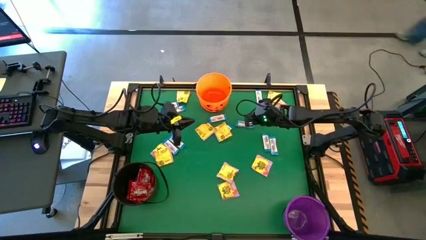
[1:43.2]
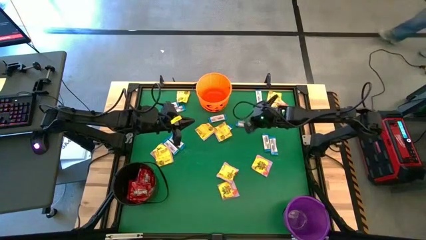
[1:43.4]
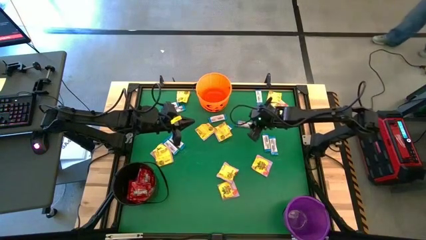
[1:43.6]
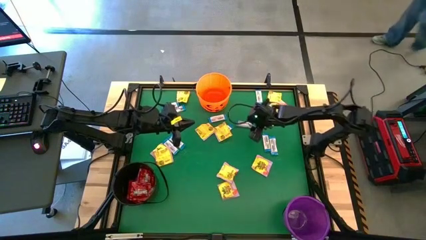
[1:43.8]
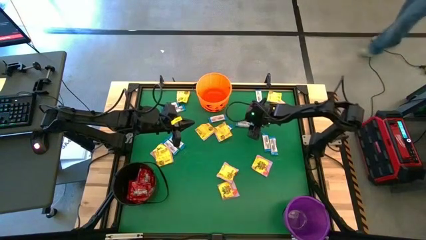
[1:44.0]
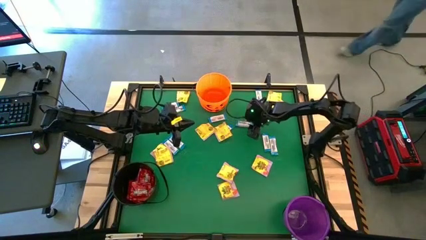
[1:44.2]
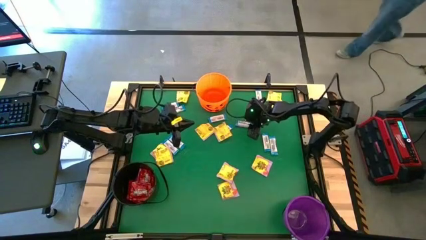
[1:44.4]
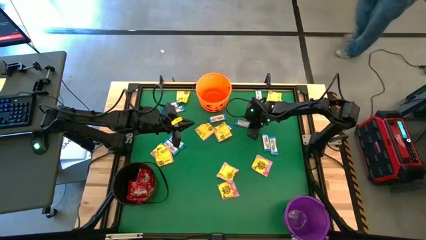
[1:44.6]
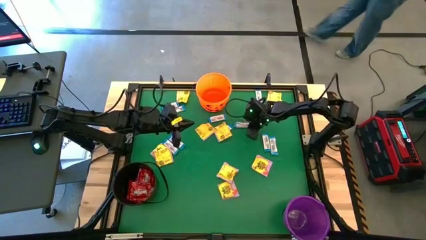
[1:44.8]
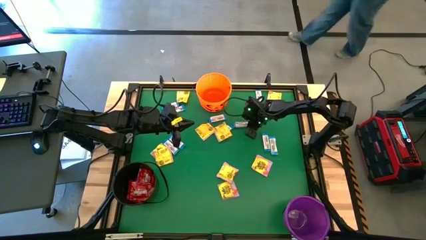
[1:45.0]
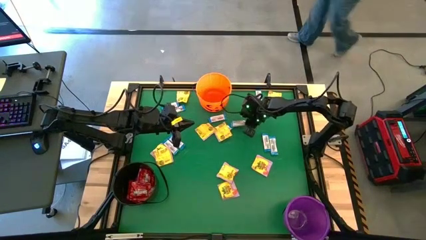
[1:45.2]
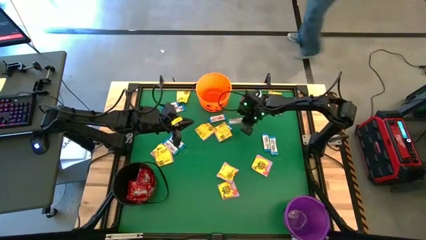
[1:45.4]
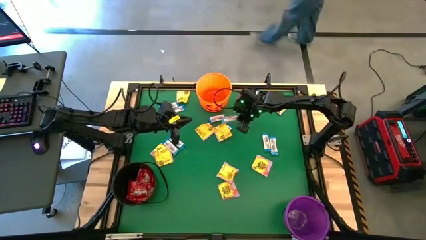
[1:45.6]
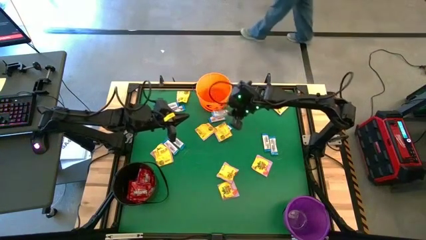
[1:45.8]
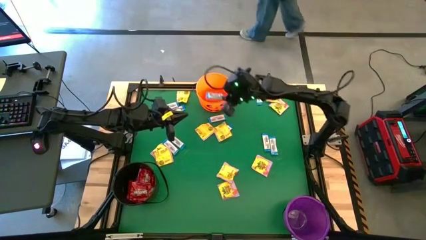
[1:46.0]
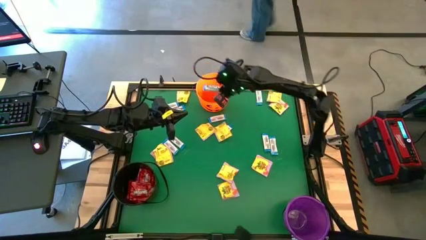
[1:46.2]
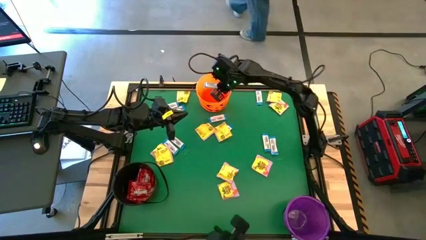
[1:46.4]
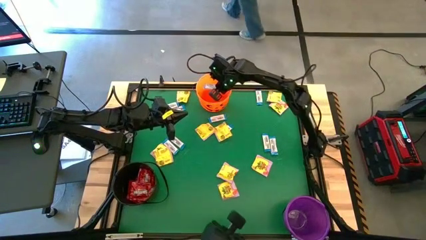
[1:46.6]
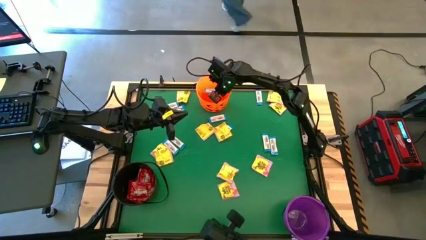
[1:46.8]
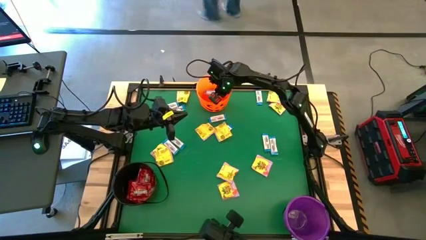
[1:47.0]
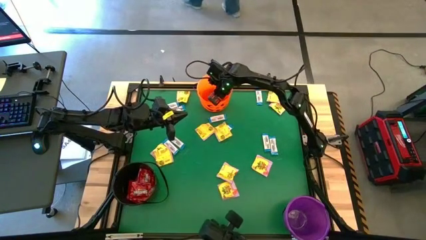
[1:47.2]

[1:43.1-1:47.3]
Task: Sort candy by brand, put in halloween buckets
Put the white chocolate into the orange bucket

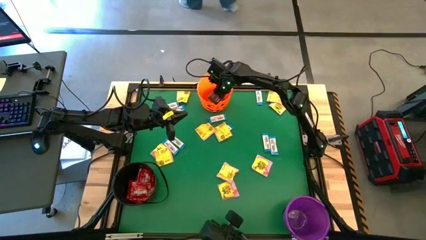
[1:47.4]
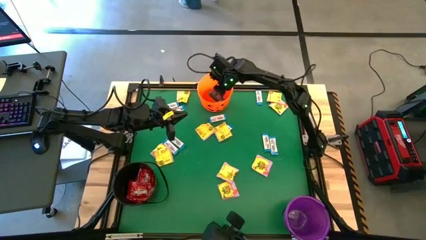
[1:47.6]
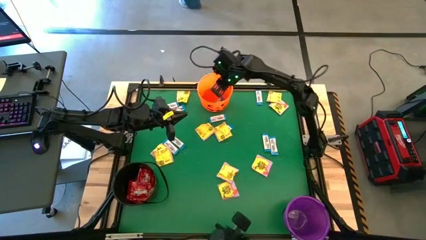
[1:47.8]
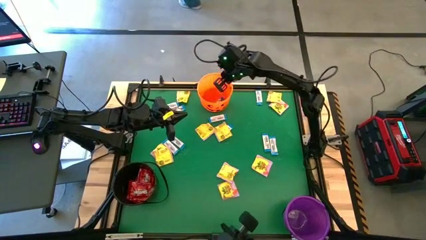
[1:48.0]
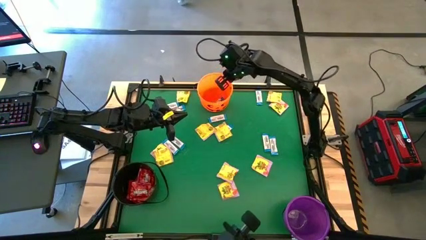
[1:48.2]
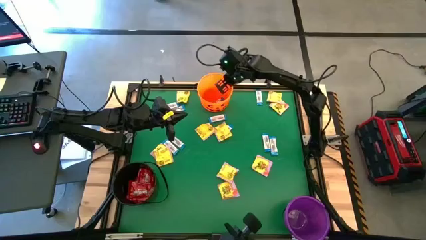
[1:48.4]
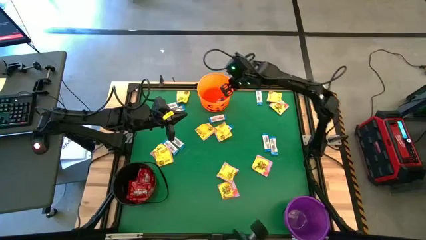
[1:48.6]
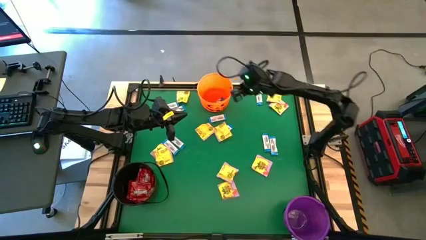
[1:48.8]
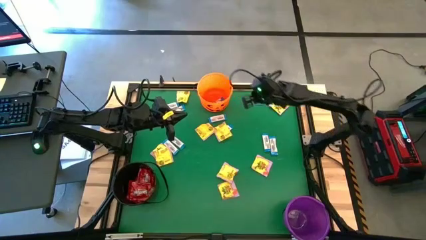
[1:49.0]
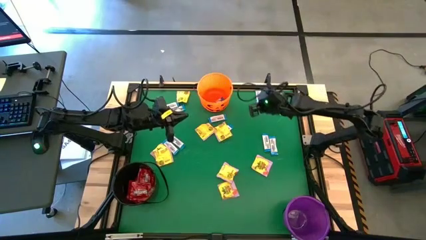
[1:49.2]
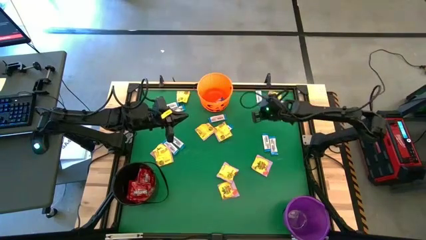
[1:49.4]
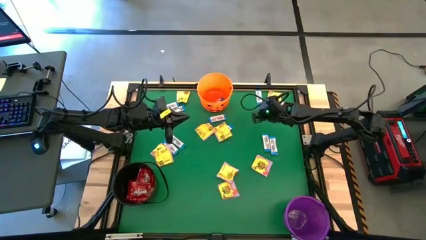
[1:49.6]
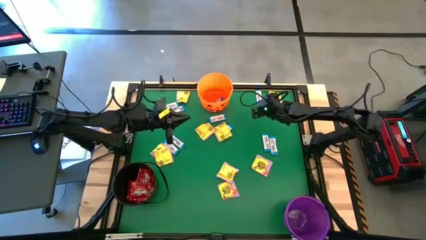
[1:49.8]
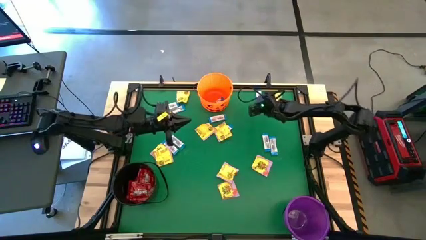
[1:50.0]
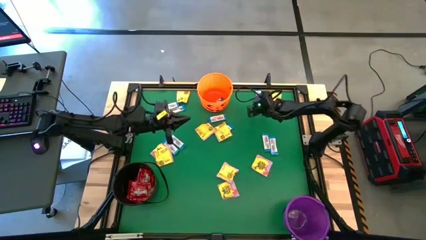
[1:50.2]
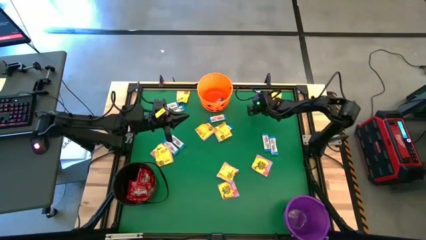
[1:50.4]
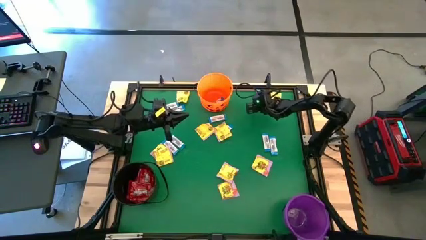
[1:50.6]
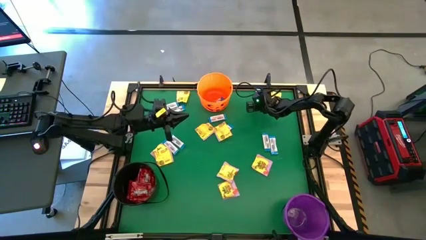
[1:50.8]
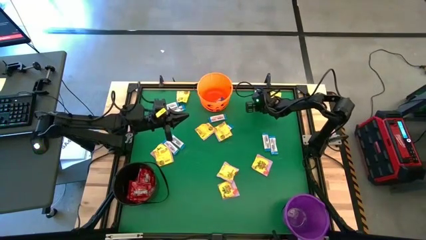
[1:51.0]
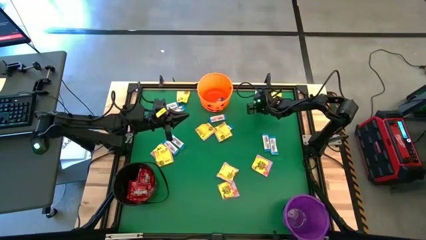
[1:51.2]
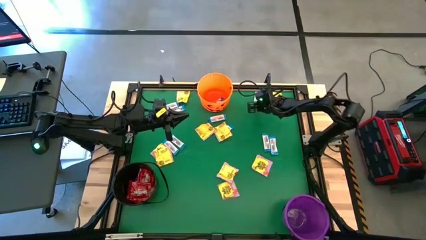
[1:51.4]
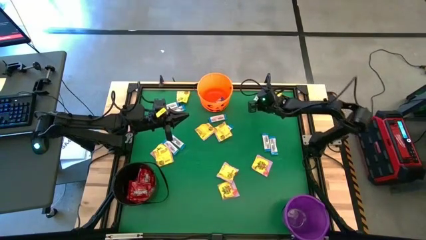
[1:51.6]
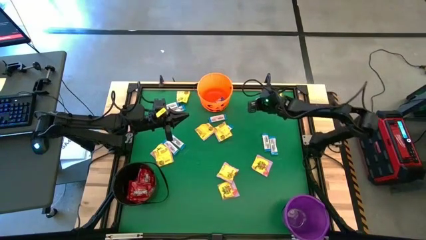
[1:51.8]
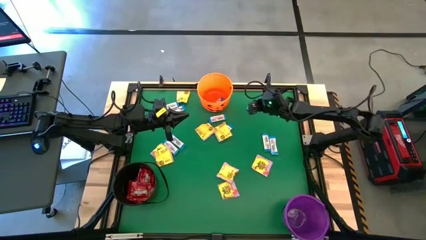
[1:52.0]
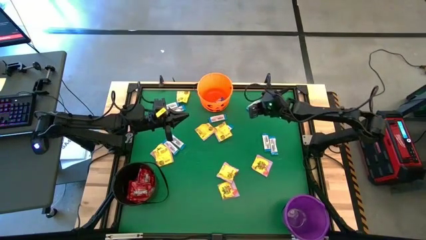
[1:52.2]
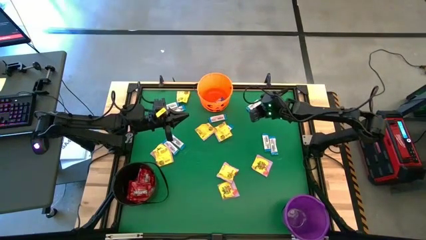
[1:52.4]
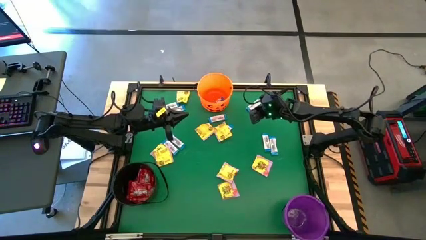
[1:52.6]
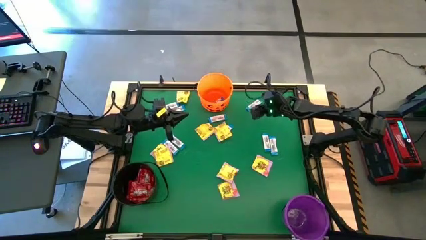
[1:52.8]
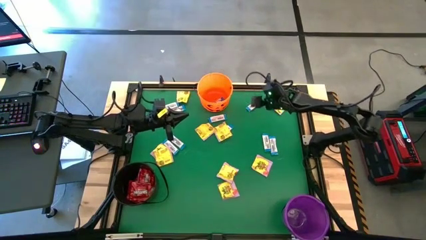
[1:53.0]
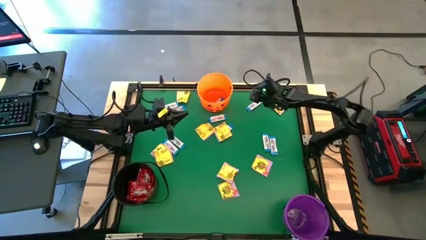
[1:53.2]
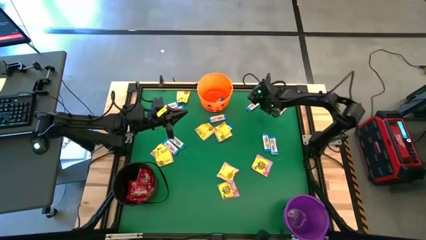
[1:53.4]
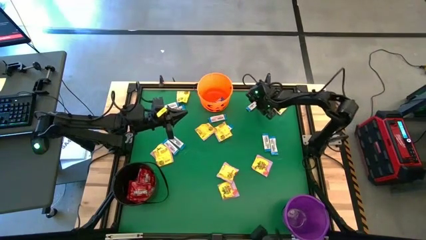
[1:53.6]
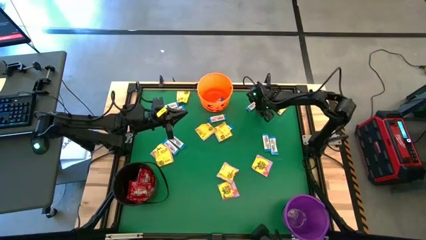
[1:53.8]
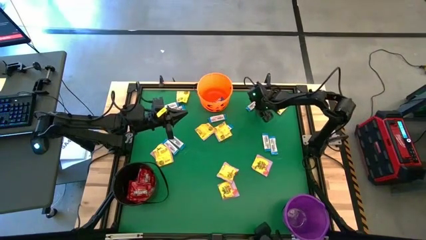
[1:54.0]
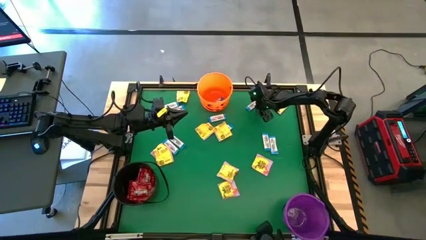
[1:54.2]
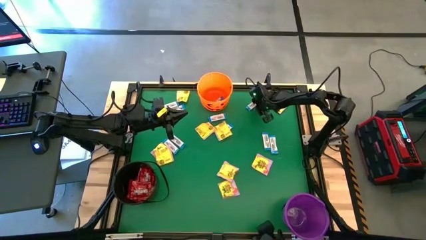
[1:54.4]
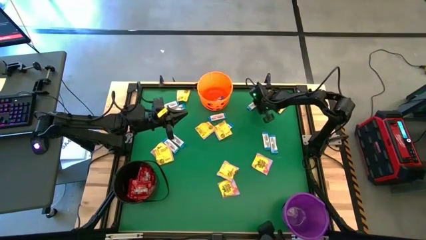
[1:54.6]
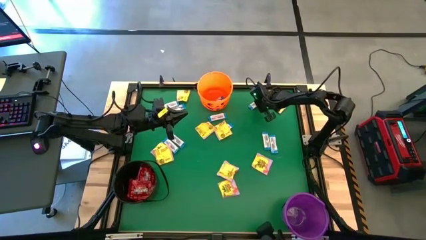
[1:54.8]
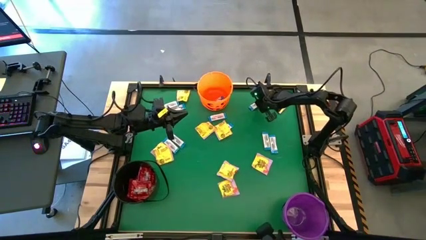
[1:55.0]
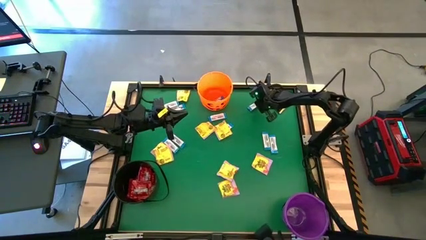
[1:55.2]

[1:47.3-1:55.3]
Put the white chocolate into the orange bucket

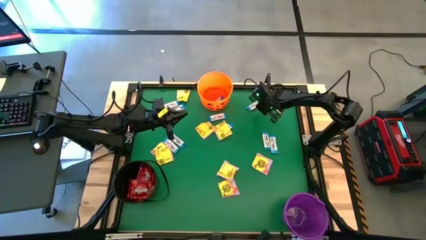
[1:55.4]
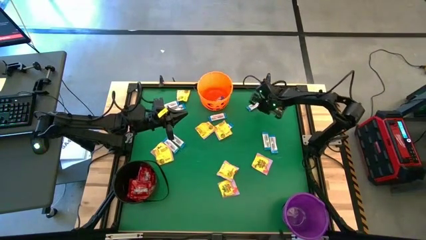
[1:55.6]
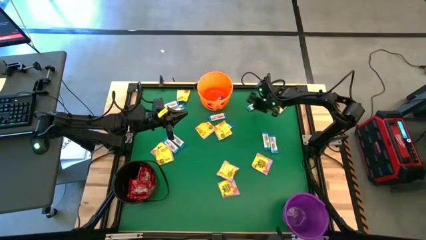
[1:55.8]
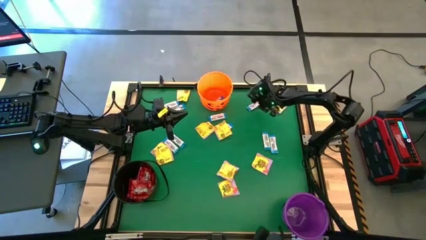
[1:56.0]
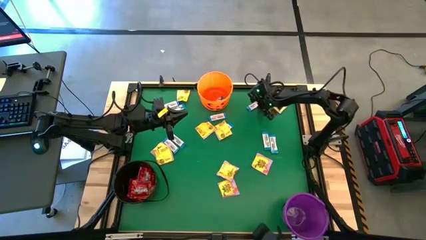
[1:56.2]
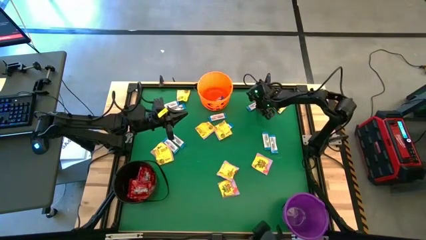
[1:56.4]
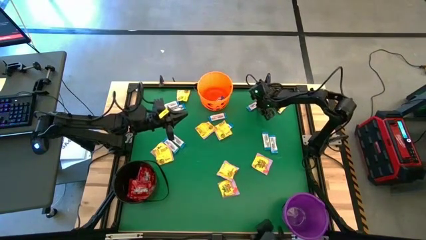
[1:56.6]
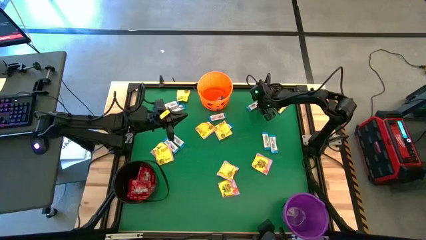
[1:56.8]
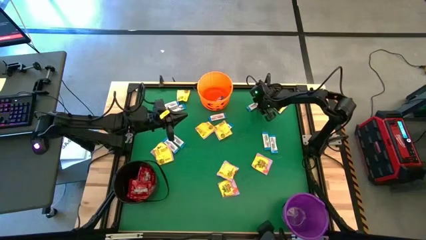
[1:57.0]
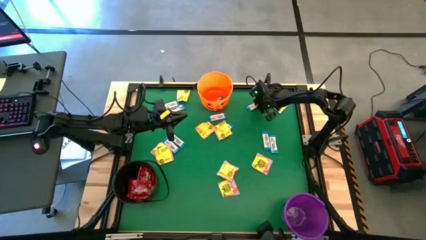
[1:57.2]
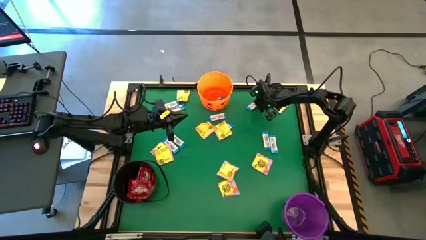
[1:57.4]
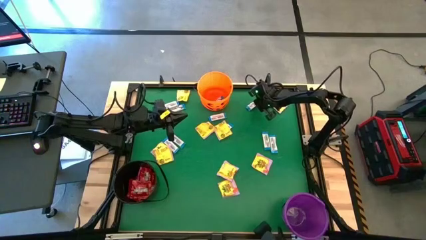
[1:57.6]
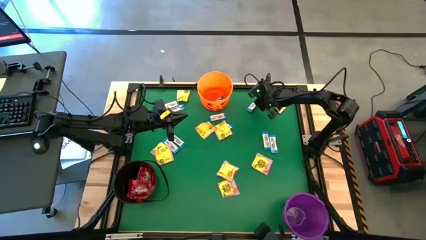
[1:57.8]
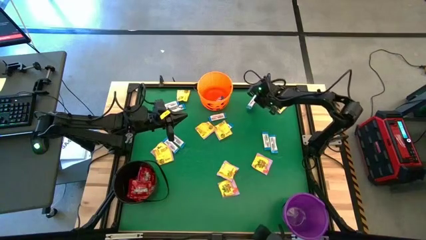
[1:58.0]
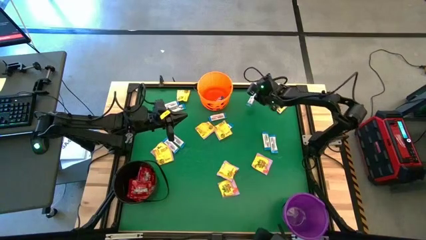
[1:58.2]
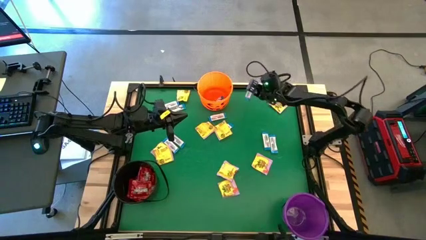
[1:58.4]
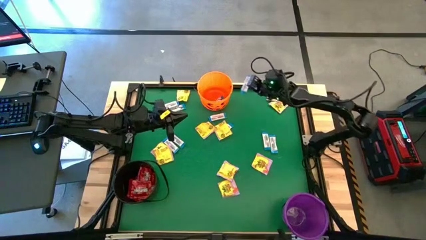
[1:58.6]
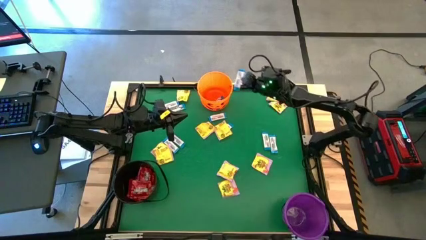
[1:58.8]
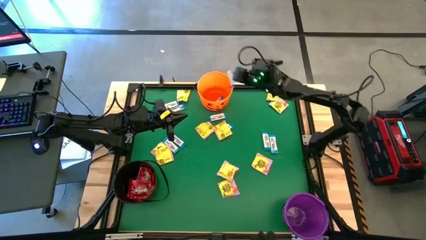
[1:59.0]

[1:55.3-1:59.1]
Put the white chocolate into the orange bucket

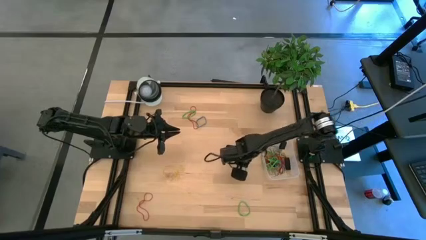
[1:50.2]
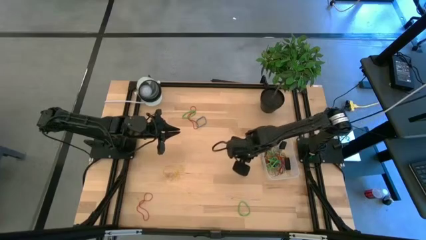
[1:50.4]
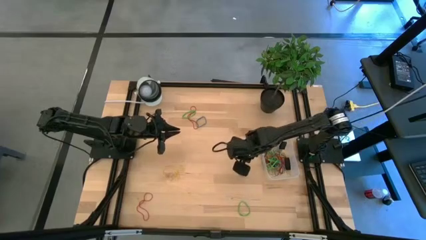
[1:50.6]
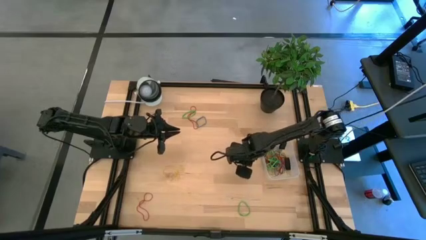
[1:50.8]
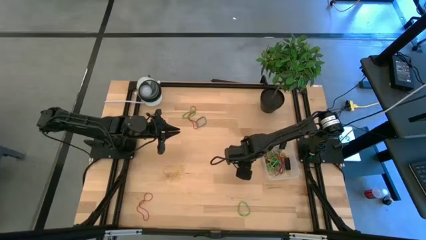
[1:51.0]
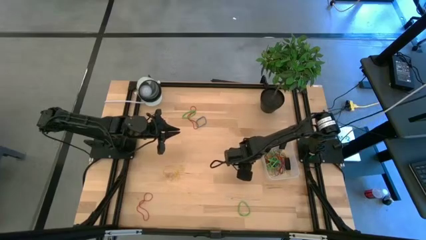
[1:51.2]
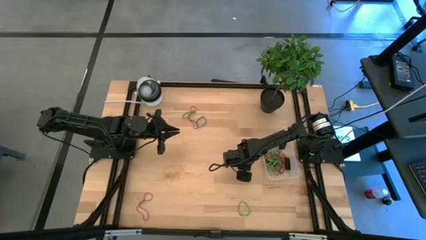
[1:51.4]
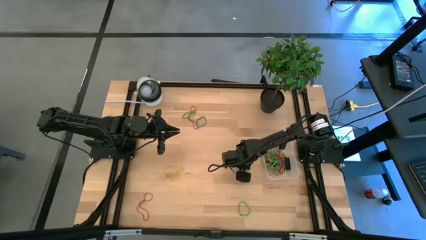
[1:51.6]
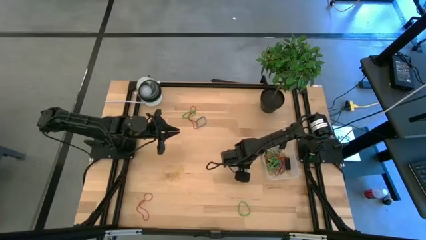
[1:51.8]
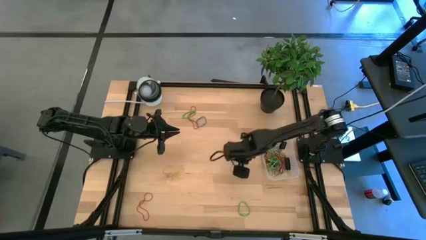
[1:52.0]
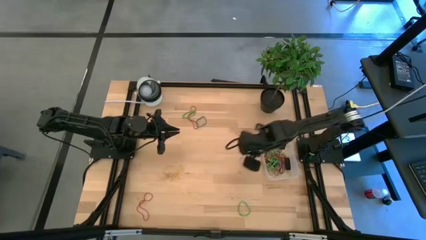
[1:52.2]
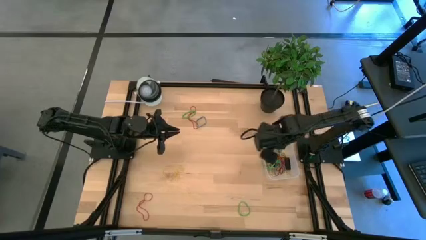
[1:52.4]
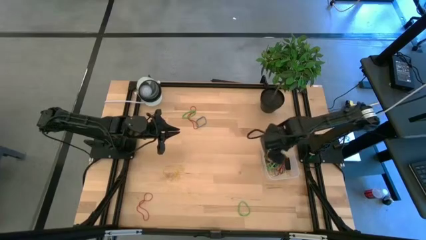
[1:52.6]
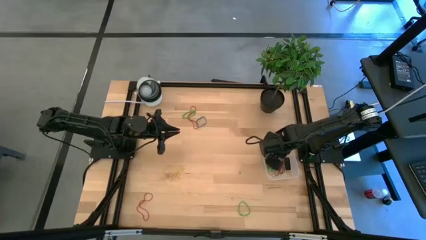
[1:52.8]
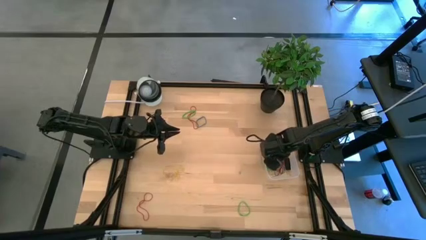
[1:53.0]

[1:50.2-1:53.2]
Task: Pick and place rubber bands into bin
Put the blue rubber band into the transparent bin
